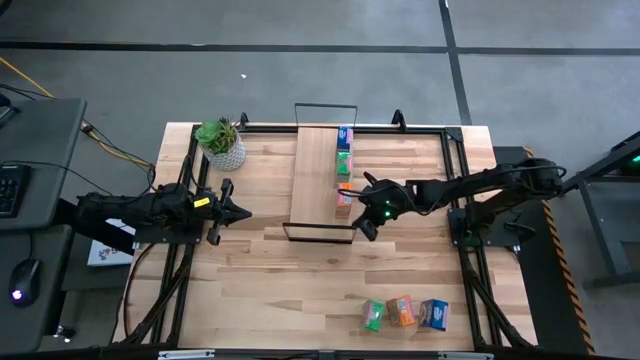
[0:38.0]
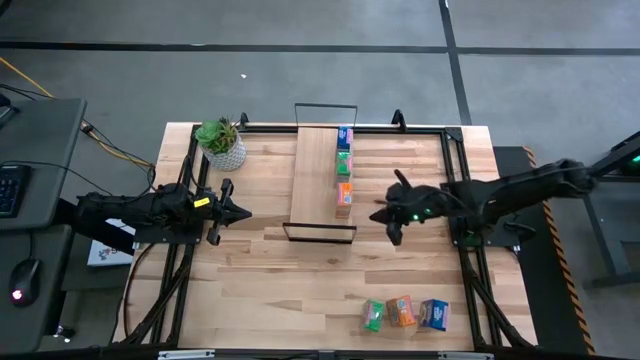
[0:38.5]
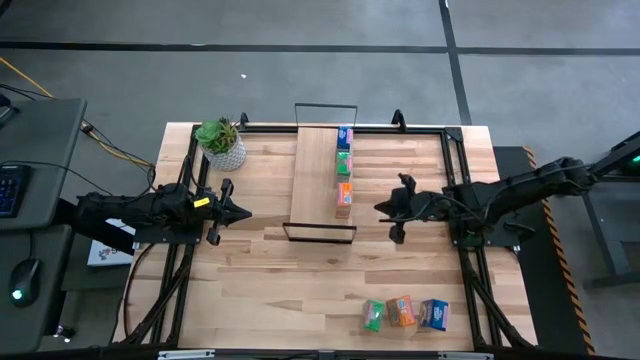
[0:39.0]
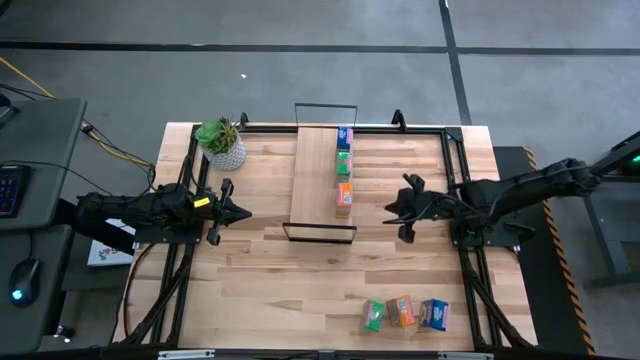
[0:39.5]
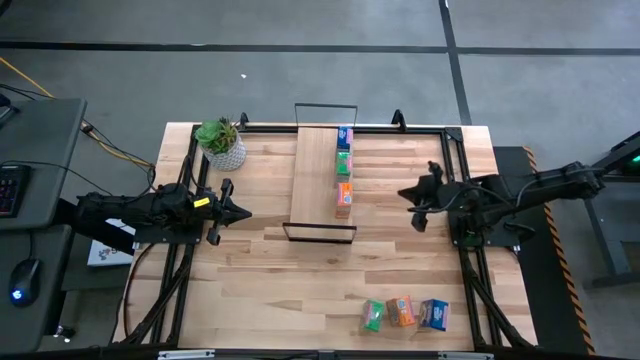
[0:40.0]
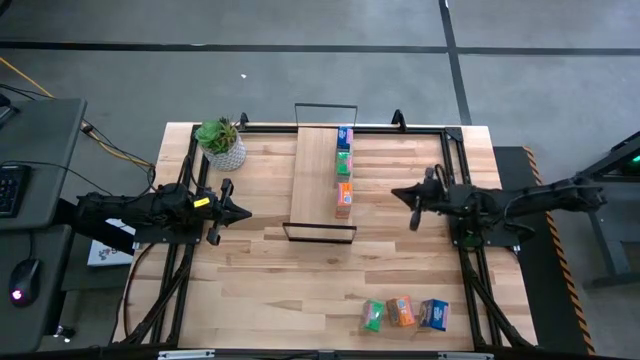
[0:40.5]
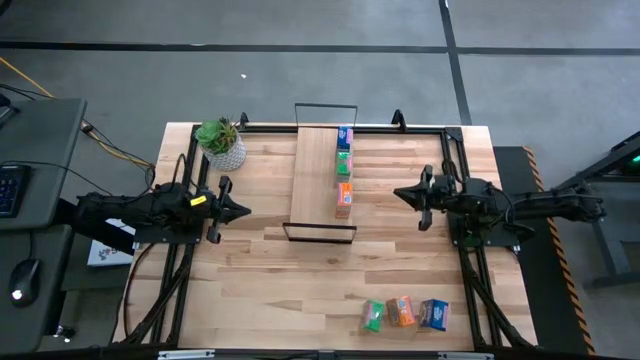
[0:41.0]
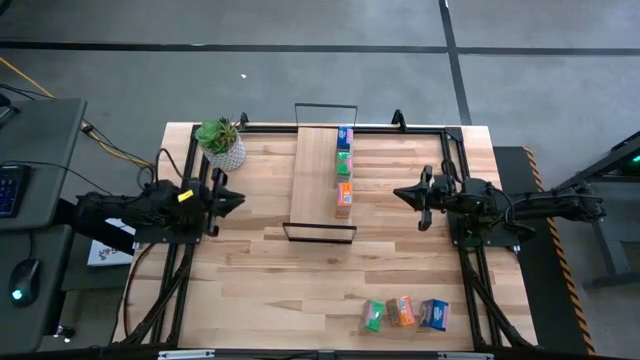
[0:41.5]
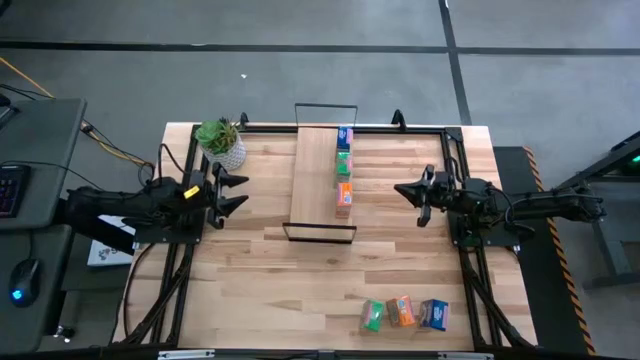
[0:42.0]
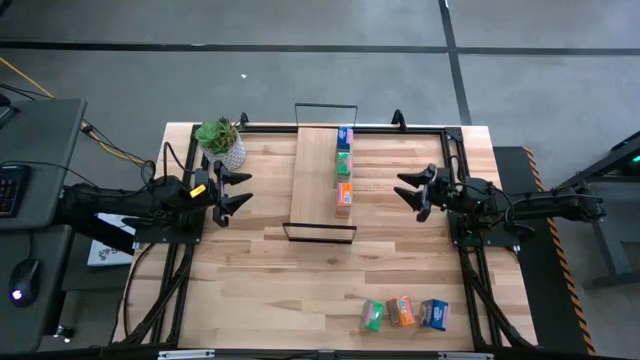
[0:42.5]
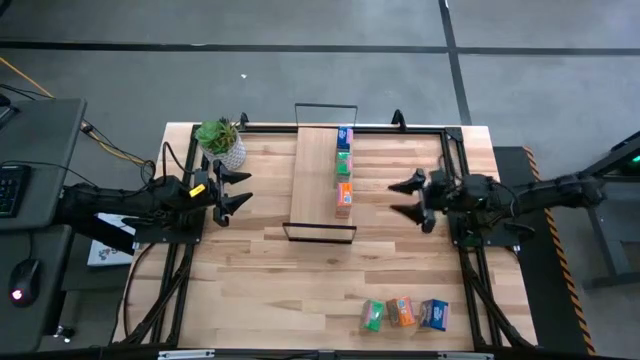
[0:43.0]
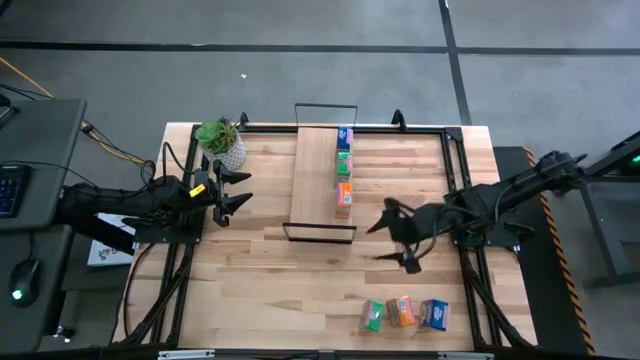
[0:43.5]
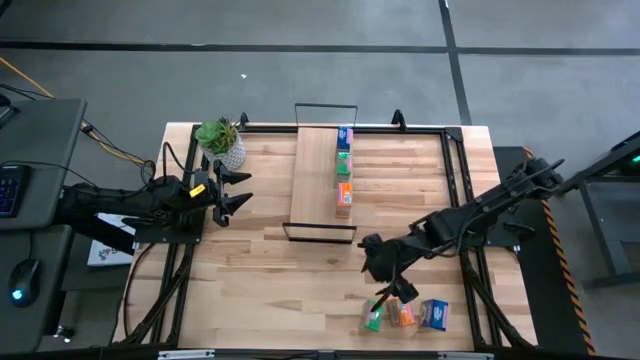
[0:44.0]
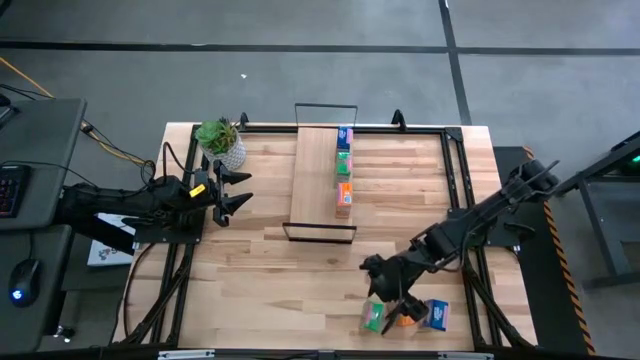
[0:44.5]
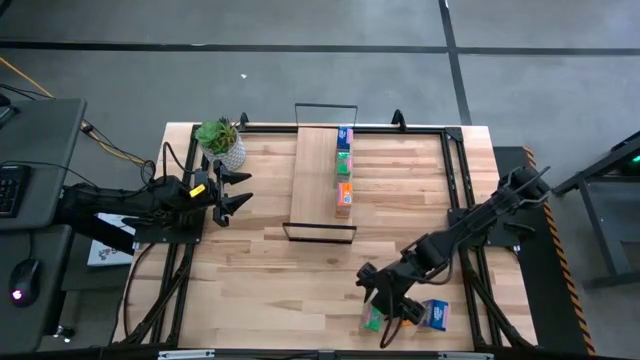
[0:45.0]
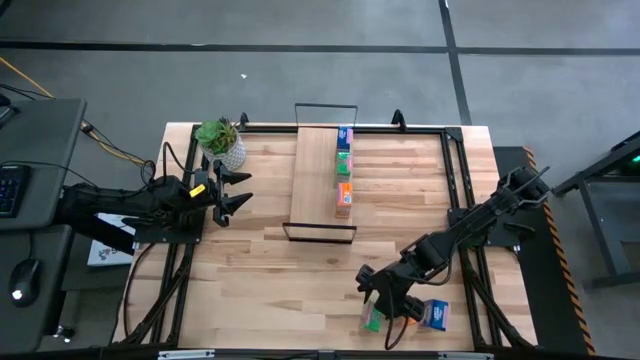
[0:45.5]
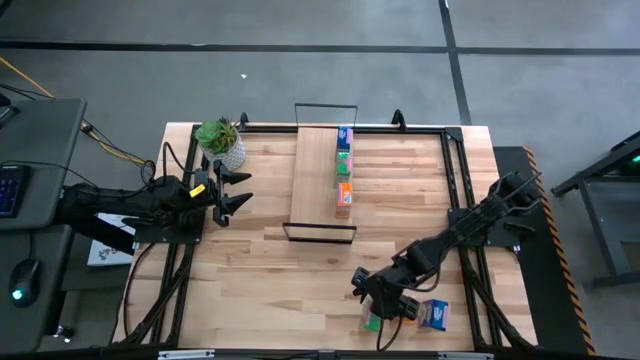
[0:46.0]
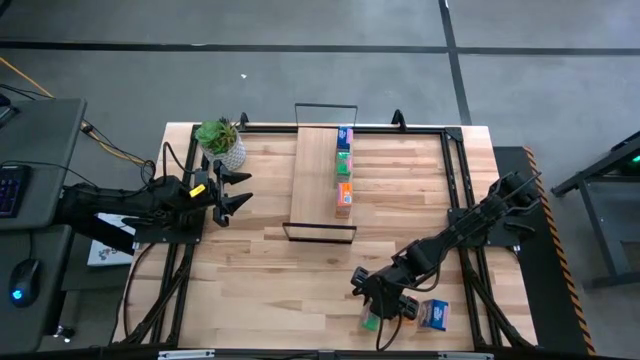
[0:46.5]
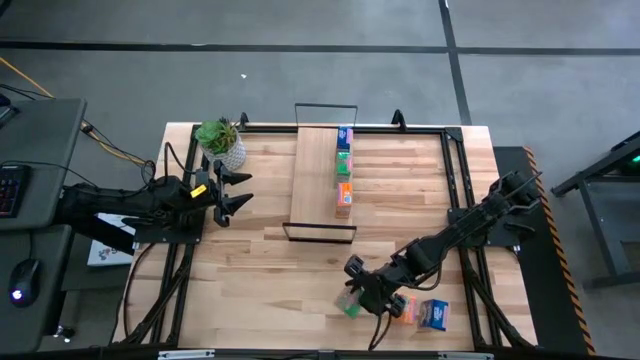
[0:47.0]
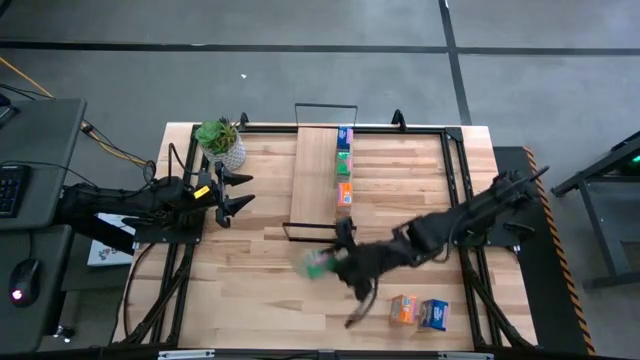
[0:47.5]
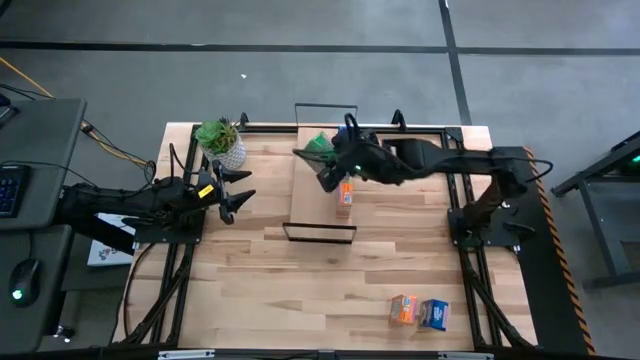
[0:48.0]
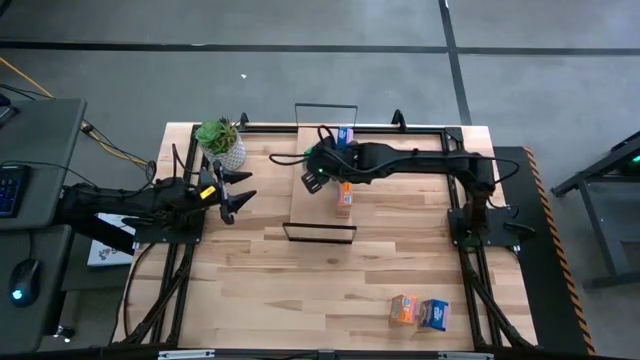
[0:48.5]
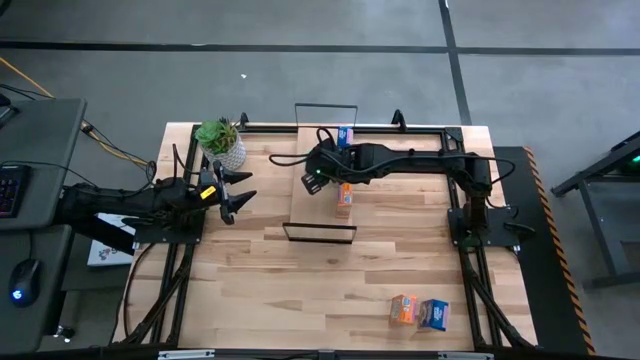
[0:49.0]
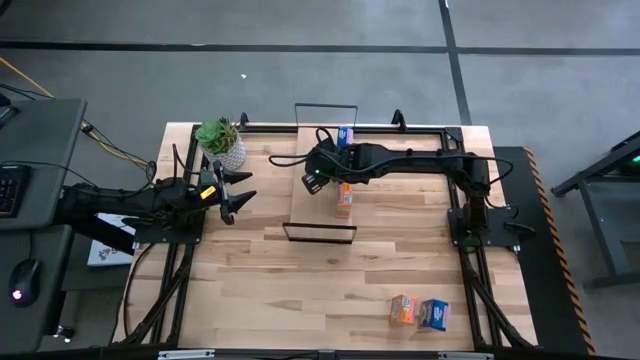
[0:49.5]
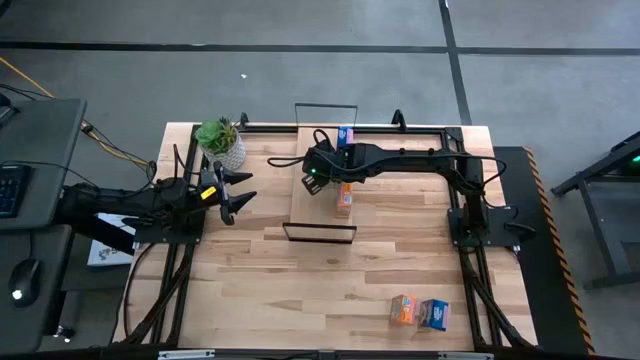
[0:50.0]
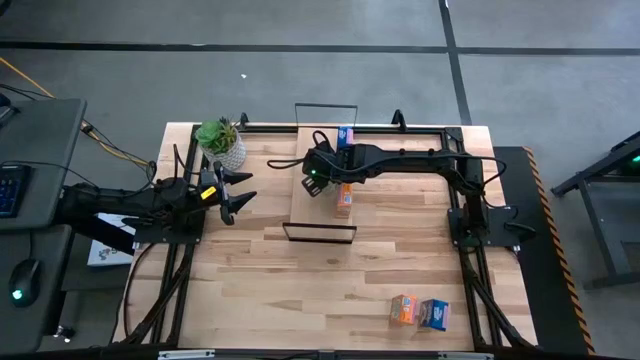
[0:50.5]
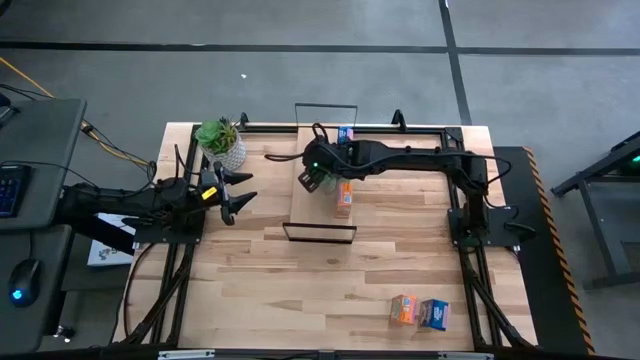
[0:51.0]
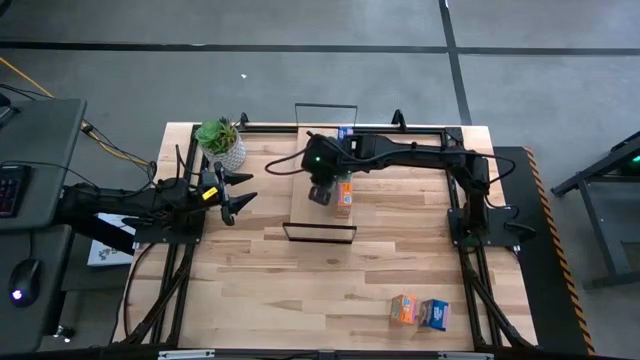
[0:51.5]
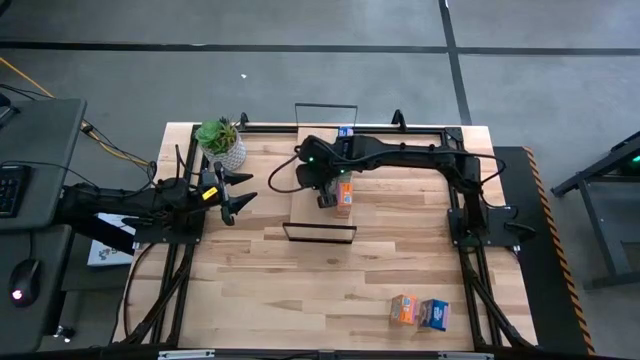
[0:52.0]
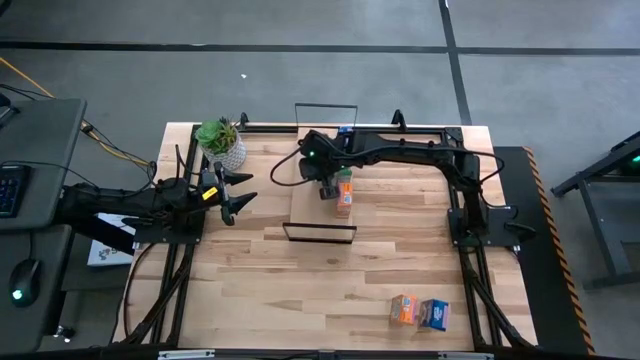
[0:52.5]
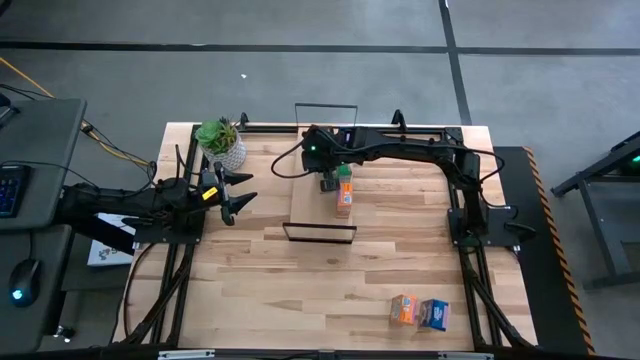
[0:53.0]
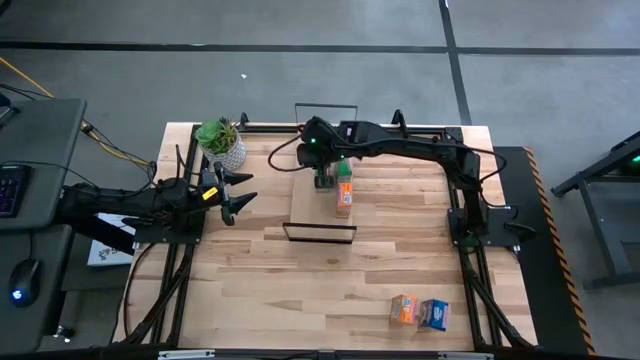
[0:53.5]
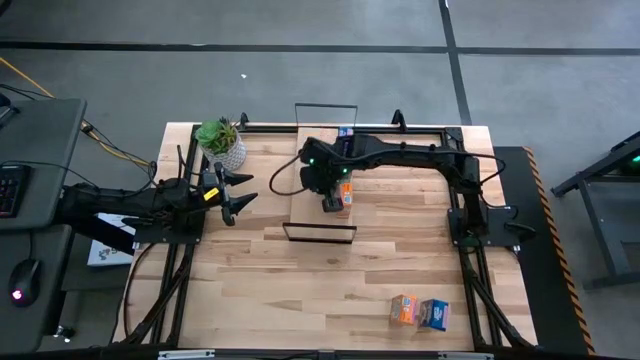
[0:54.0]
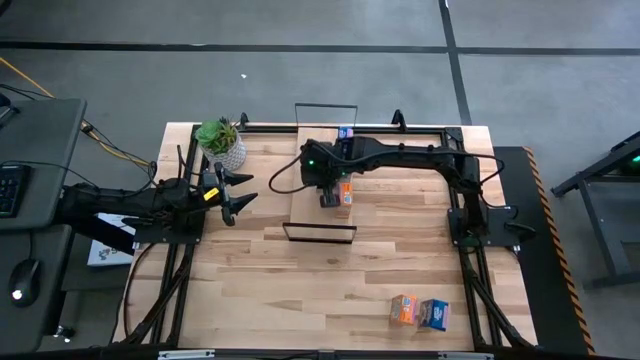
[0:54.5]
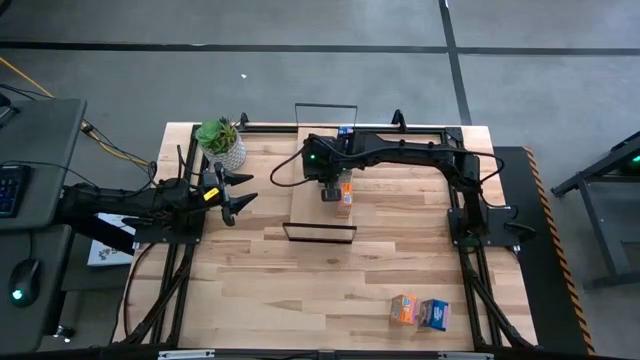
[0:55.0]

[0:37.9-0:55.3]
Task: Stack cereal on shelf
Put the green cereal box aligned with the other green cereal box on the shelf

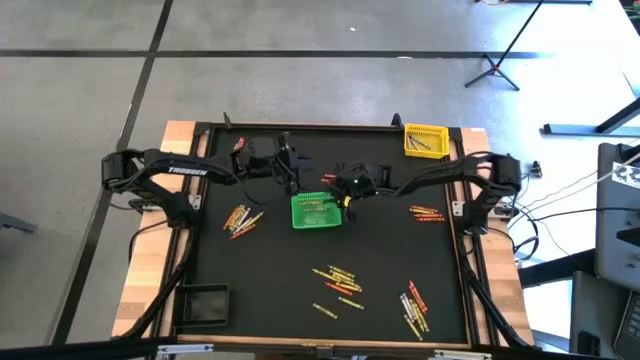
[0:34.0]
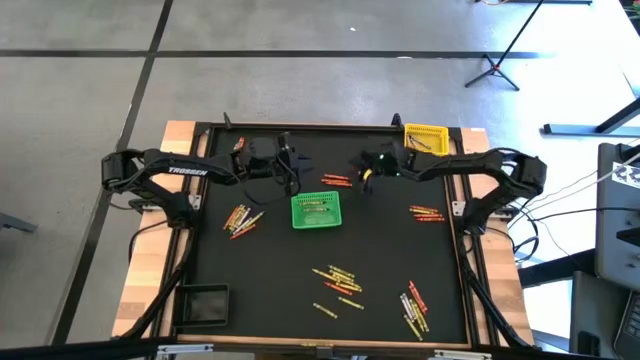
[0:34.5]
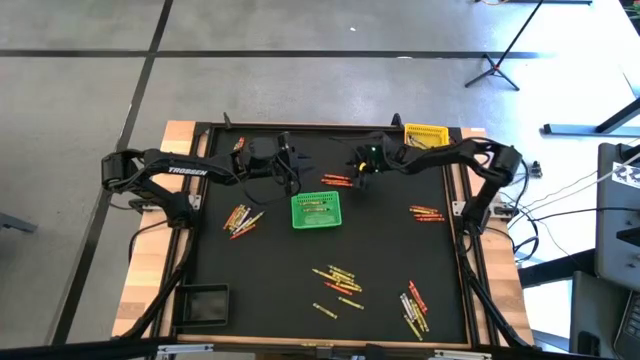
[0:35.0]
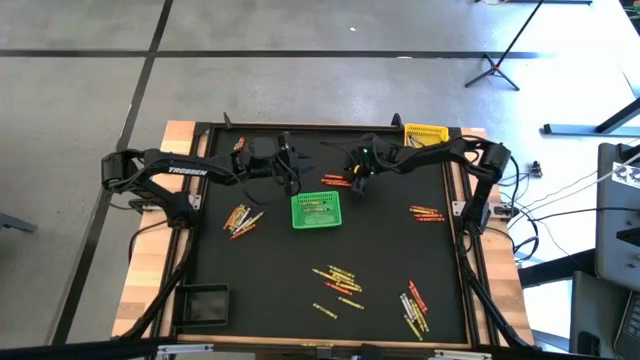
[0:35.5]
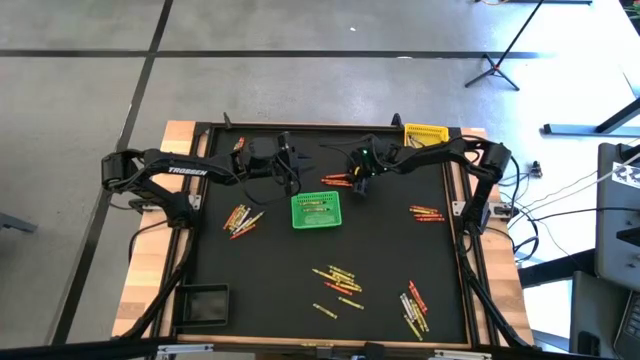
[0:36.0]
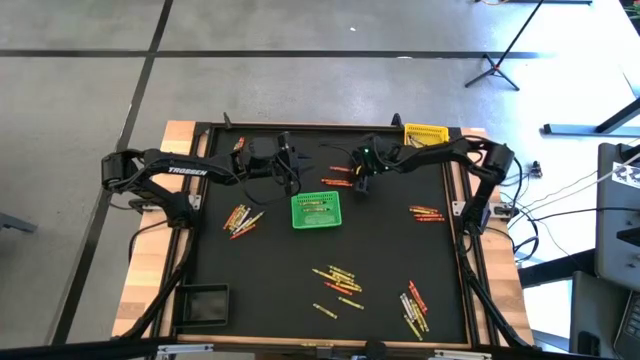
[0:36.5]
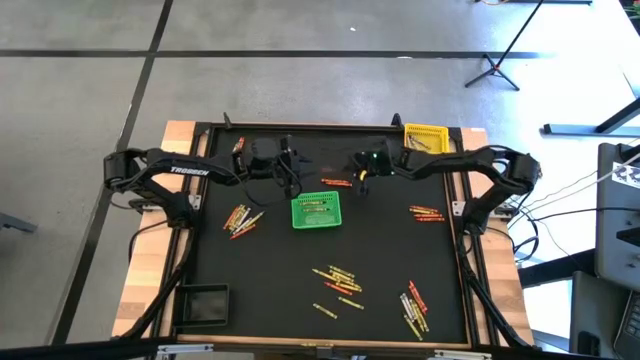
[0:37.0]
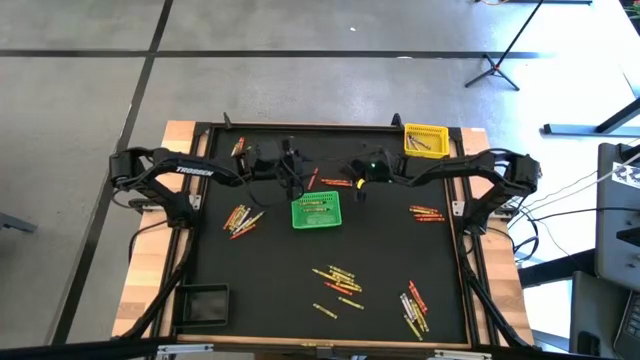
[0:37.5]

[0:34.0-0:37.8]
Task: Sort crayons
Put the orange crayon into the black bin
